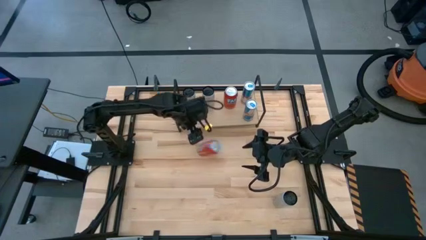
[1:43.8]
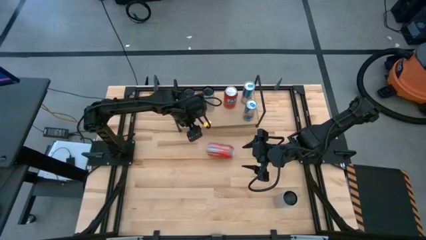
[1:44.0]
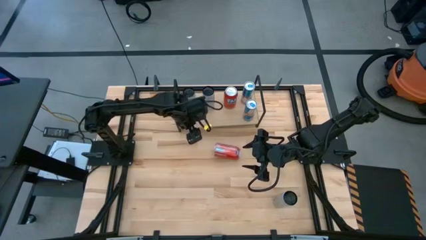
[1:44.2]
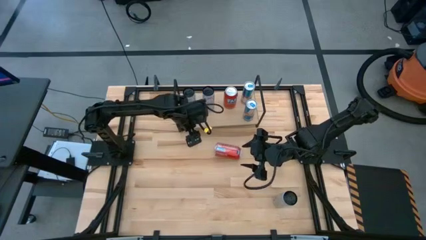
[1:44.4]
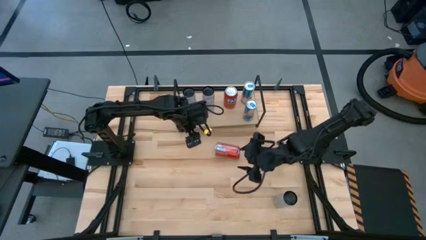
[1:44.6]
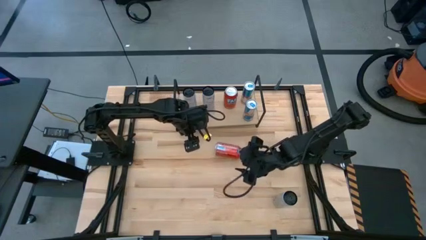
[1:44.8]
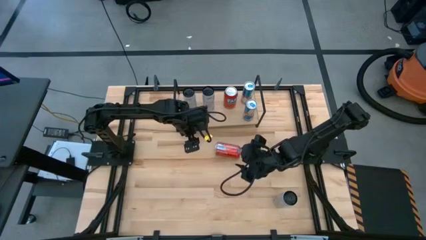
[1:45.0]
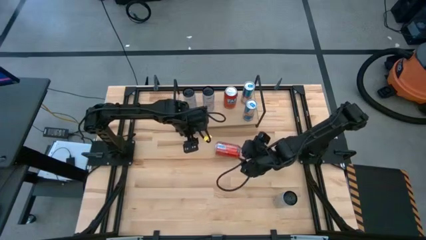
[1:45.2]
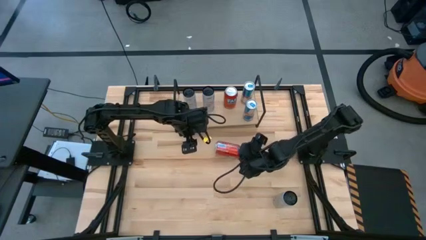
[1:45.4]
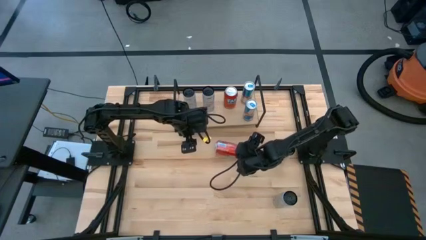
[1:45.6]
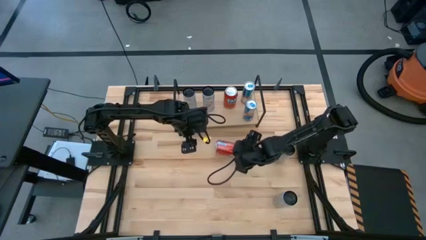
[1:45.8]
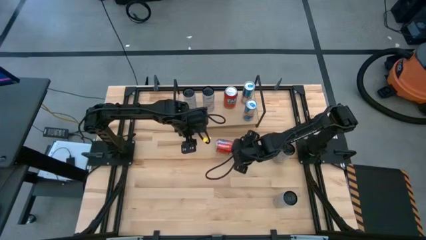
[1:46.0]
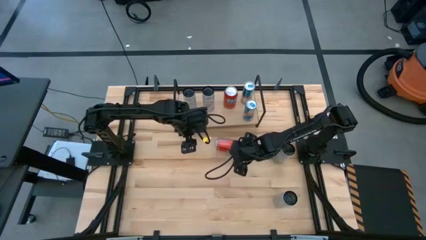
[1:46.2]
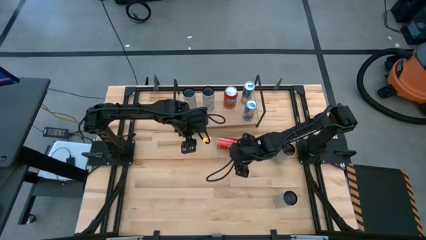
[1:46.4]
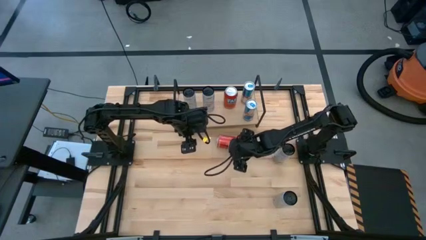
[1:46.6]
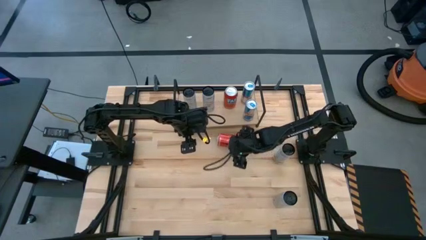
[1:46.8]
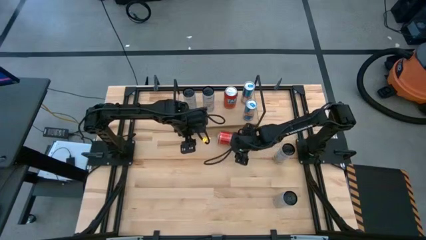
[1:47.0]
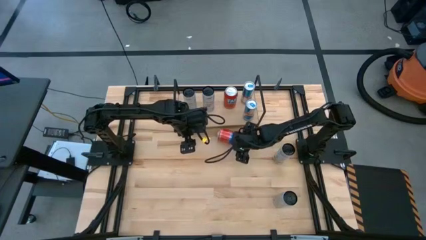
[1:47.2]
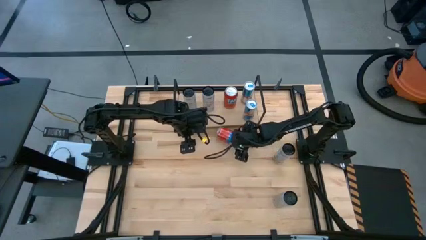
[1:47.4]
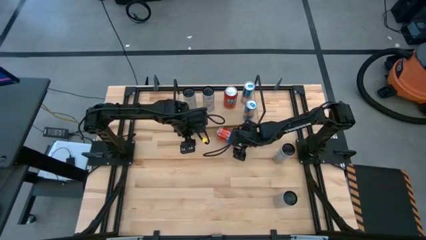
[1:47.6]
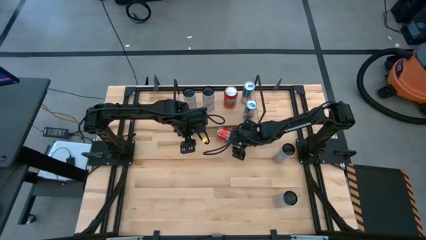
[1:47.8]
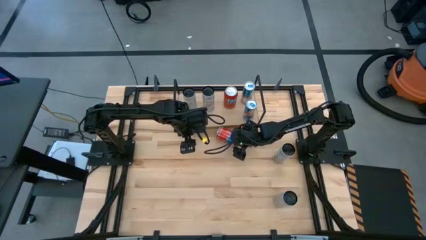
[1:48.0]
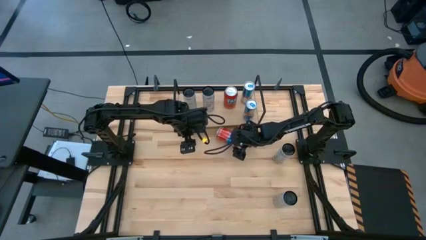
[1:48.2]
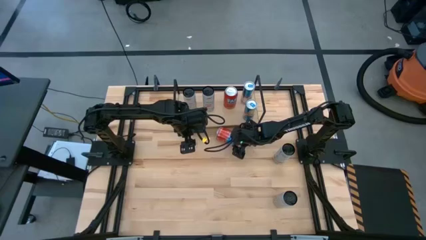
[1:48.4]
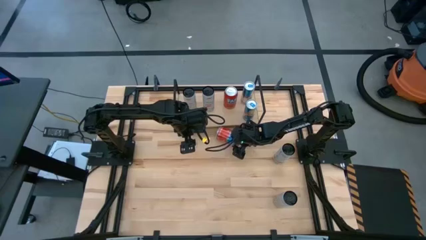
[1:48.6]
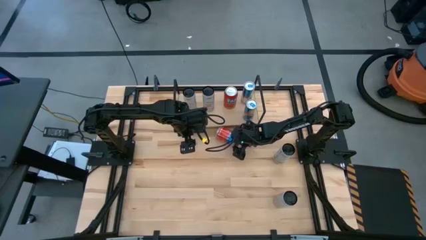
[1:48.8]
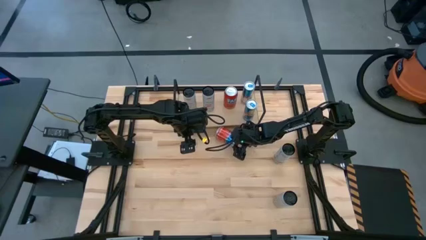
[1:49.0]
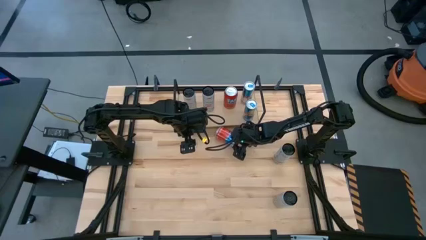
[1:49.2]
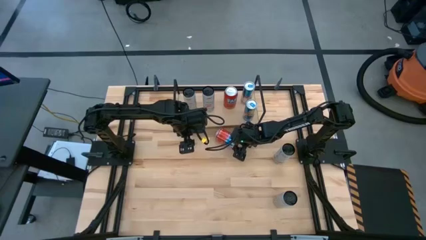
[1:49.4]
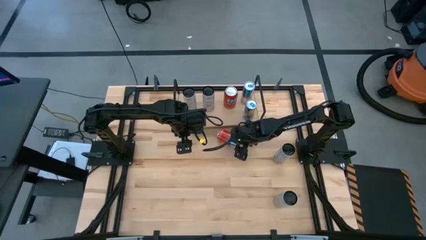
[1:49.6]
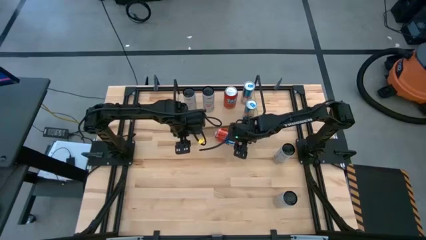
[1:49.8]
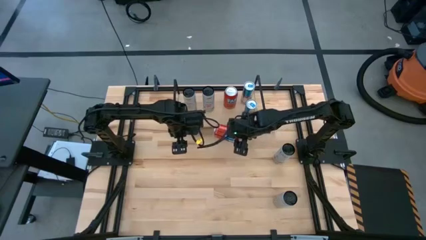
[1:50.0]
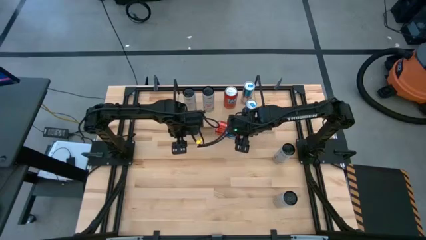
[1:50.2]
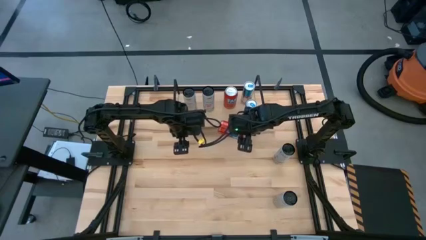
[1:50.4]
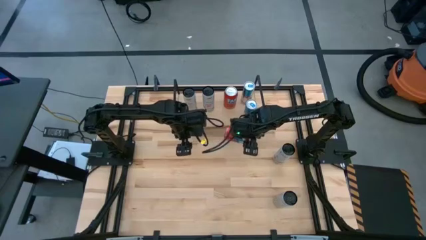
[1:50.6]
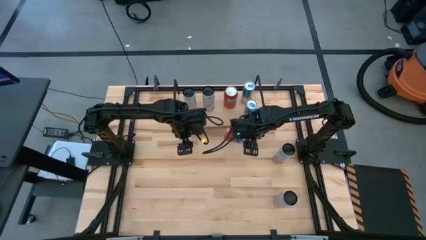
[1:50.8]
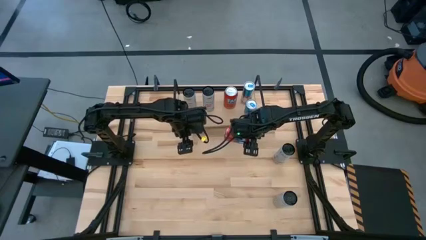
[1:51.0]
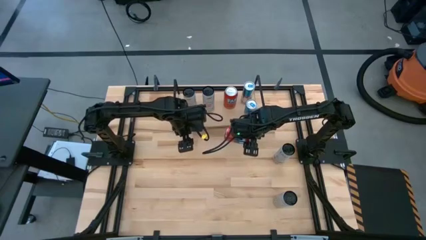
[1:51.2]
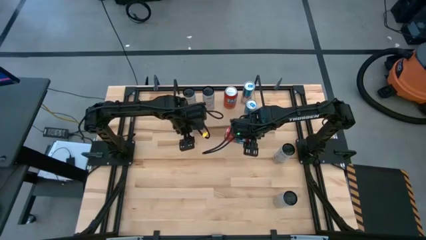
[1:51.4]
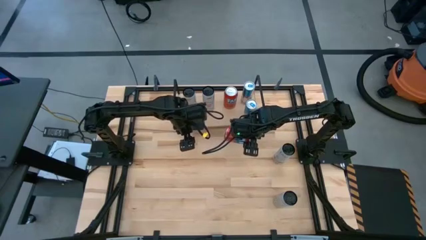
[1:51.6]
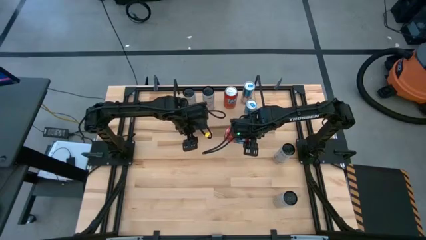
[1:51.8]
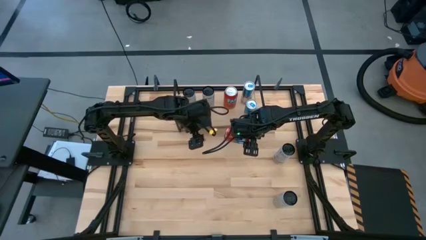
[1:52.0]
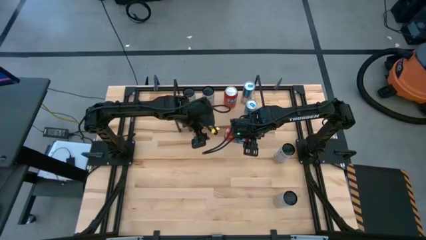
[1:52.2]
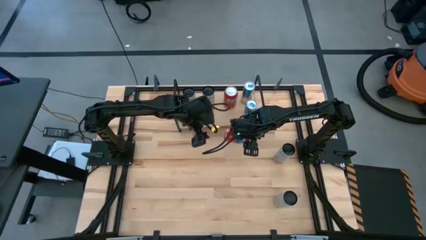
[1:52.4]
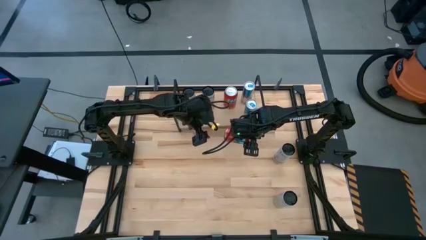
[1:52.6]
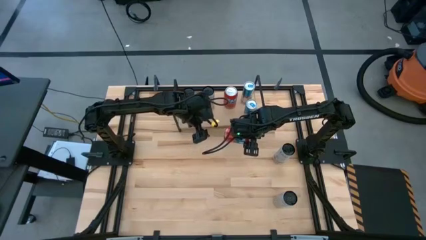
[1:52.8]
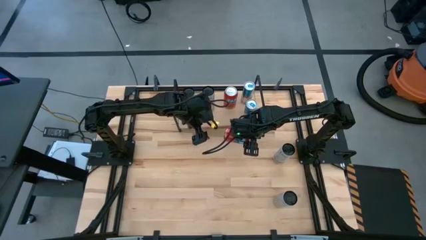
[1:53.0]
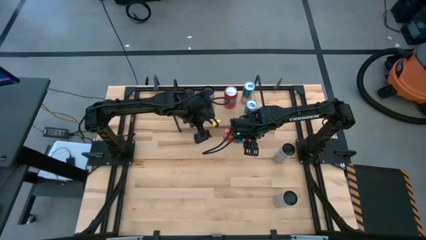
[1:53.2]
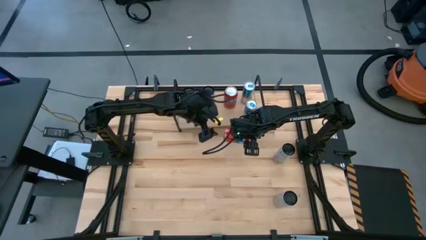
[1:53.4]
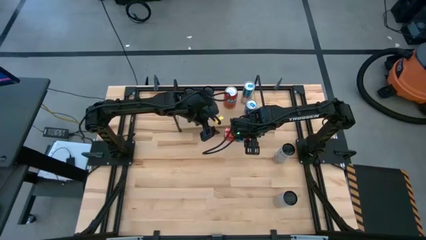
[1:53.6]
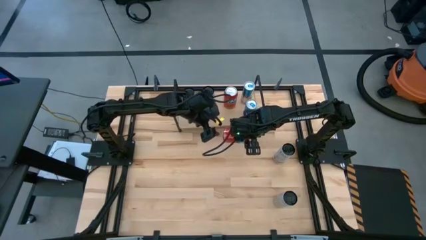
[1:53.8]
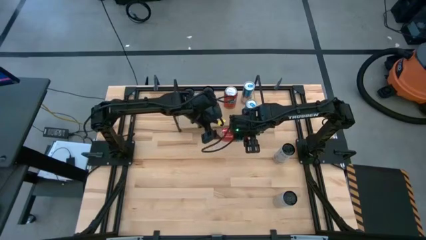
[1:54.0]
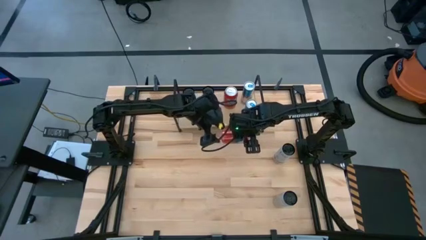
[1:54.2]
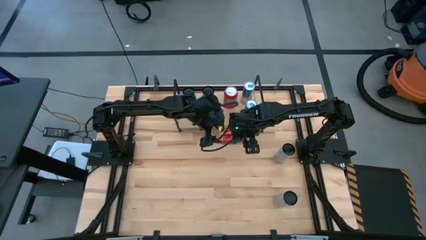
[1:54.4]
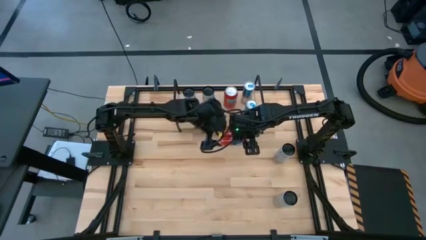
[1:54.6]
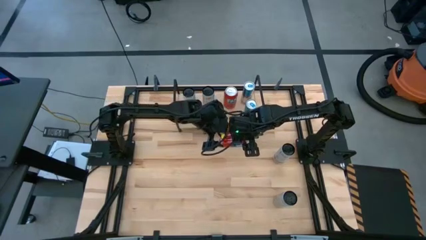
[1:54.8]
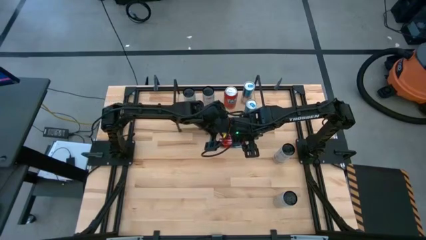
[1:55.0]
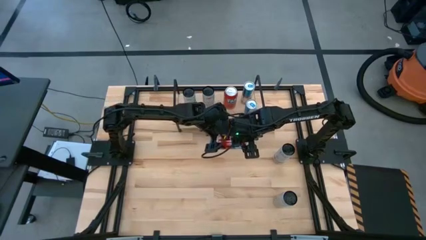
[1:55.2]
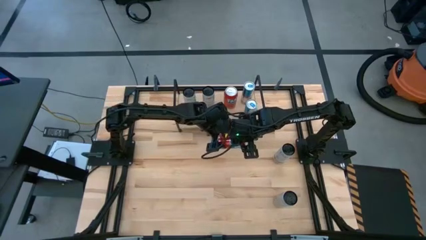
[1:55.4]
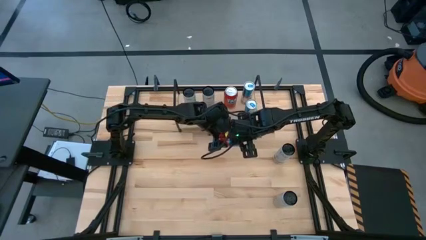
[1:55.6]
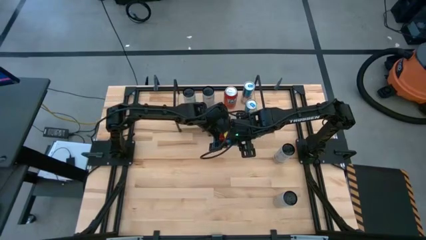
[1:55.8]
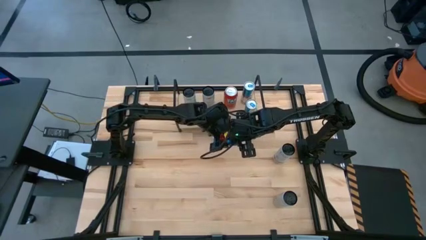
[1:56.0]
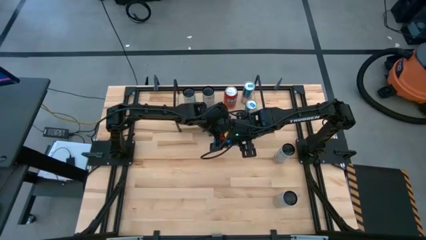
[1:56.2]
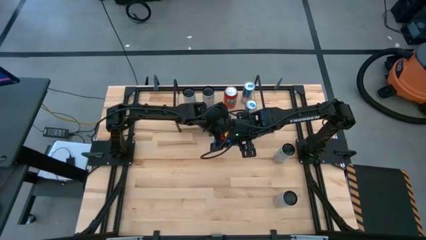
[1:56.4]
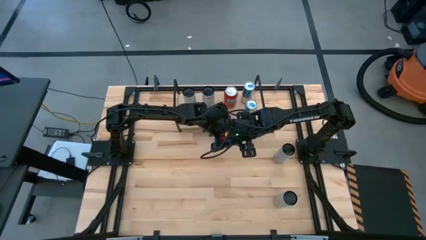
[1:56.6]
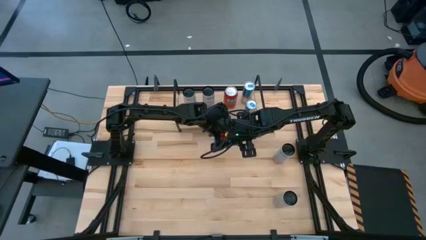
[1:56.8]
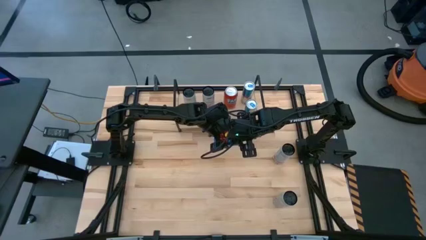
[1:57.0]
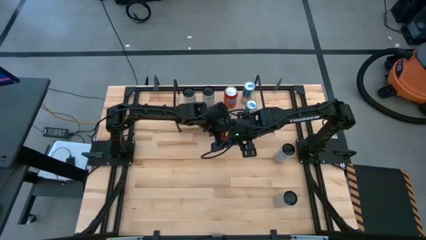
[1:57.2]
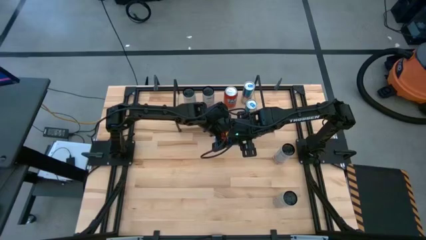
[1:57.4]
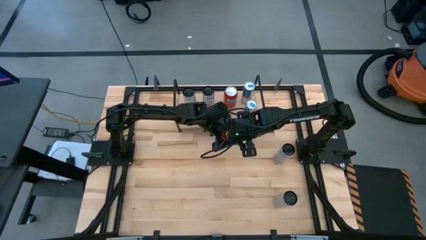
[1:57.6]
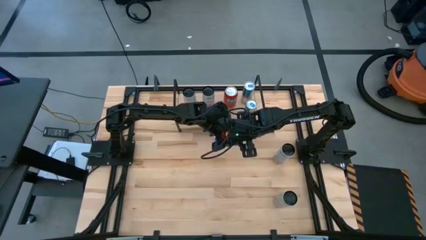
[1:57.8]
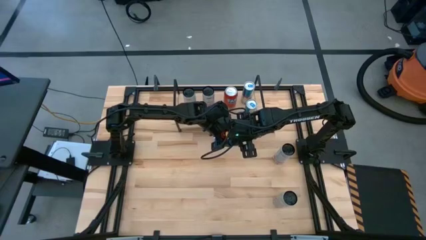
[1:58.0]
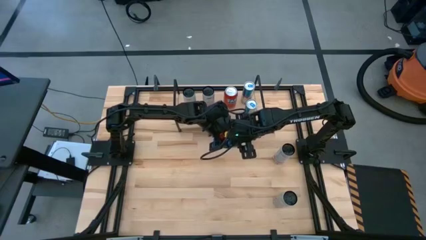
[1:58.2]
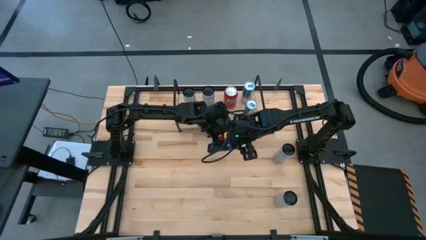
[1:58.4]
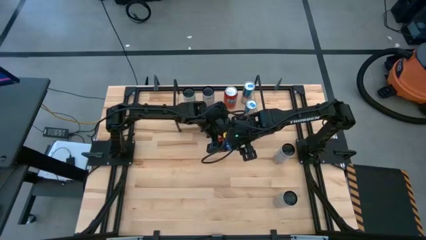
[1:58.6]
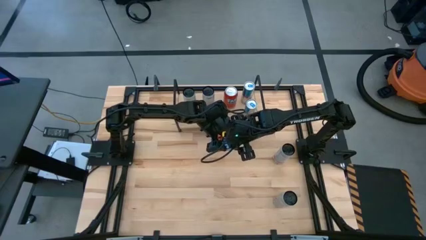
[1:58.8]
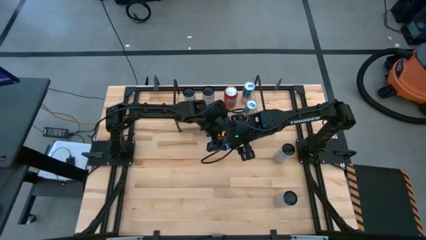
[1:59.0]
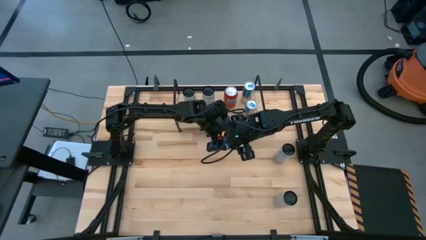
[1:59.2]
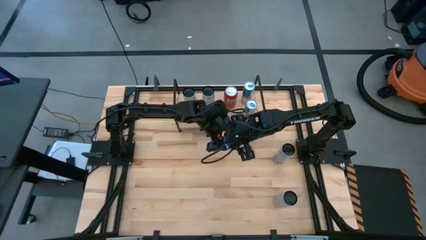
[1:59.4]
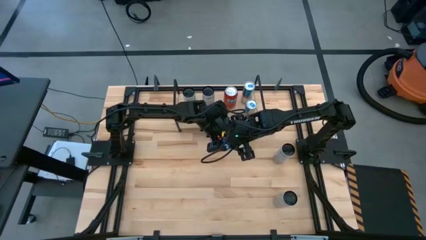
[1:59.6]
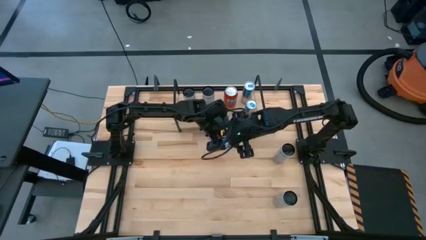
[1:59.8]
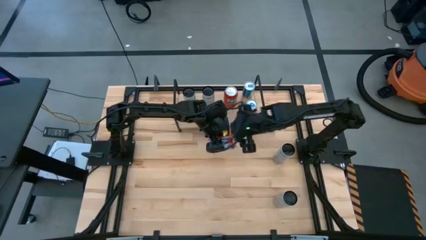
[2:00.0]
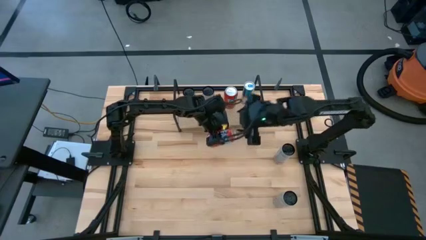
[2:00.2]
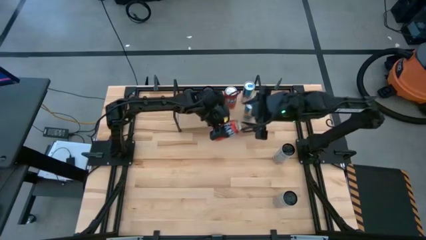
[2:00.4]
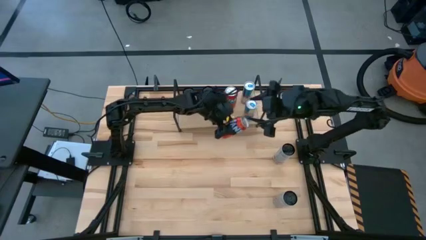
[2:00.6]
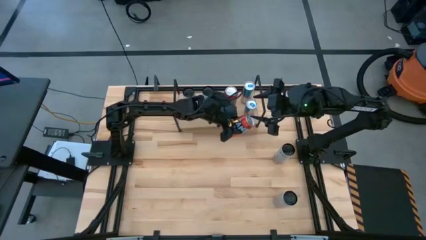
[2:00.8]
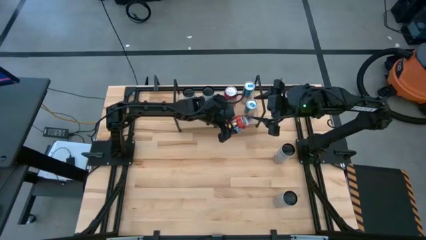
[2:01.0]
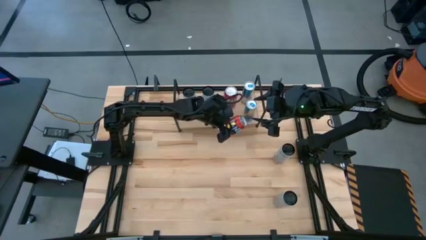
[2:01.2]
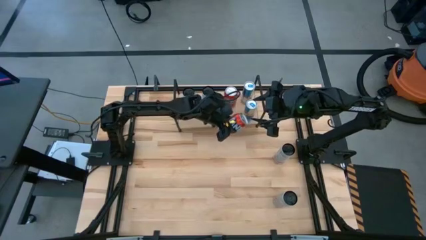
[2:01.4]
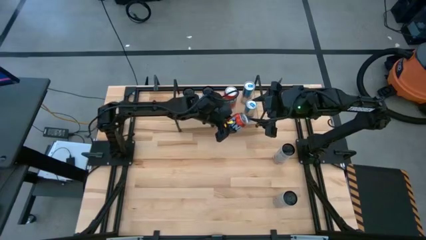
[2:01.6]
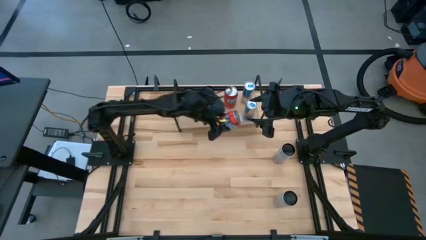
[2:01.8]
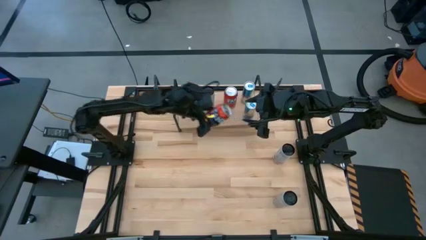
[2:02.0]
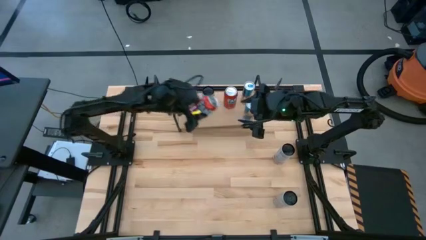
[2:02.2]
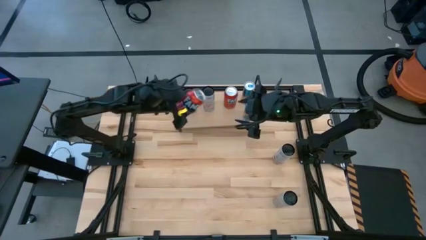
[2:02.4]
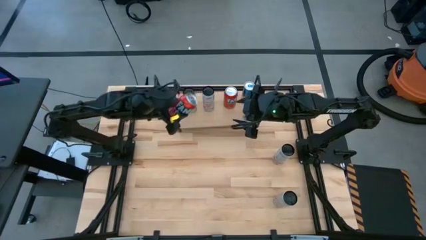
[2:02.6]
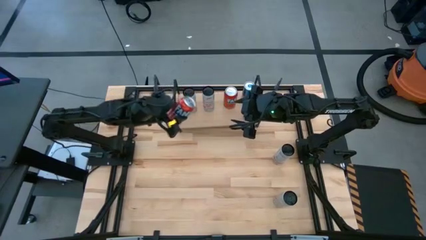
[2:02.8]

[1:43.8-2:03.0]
Task: Place canned beverage on shelf
Put the orange soda can aligned with the other orange soda can on the shelf
